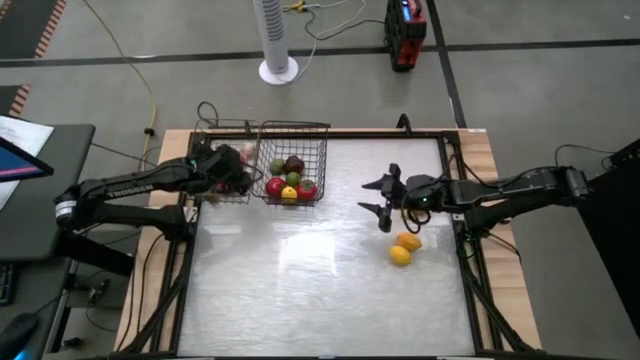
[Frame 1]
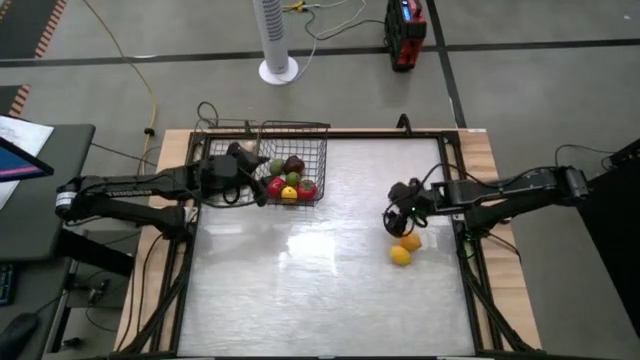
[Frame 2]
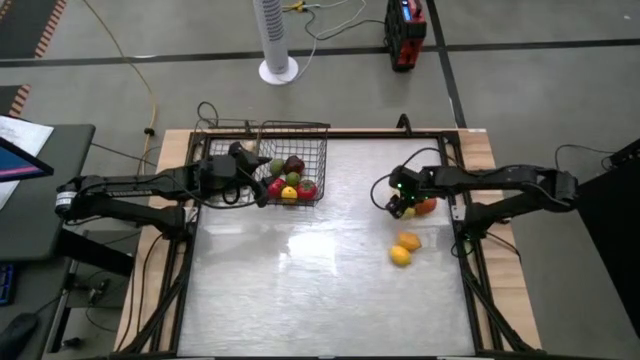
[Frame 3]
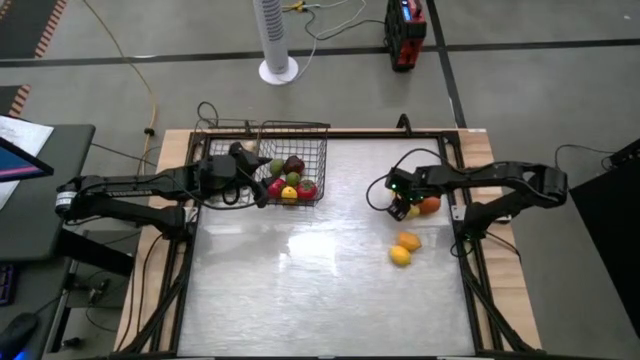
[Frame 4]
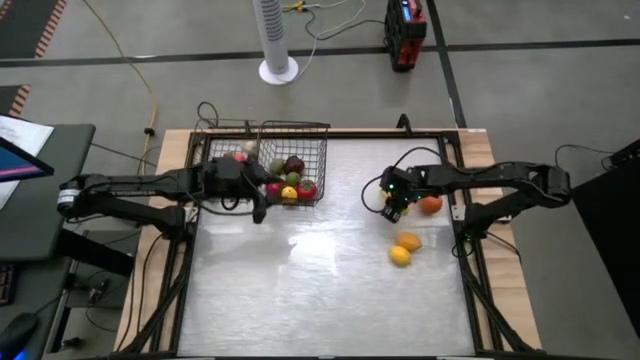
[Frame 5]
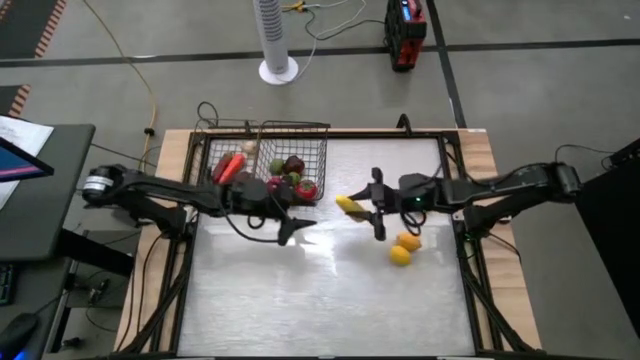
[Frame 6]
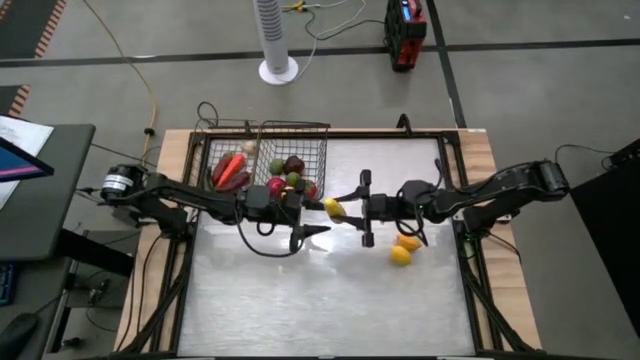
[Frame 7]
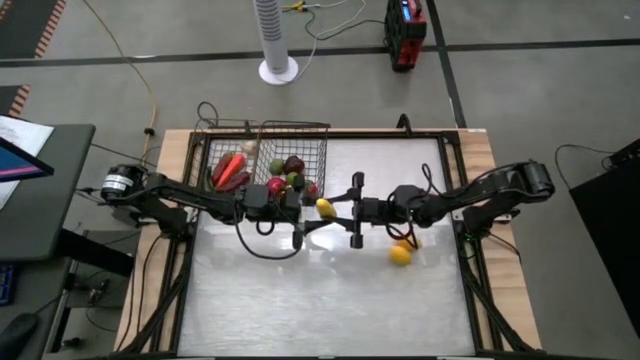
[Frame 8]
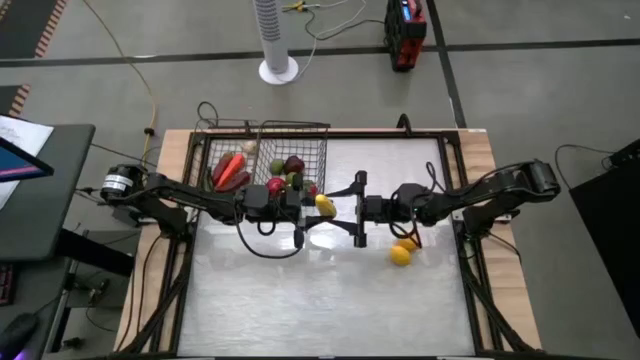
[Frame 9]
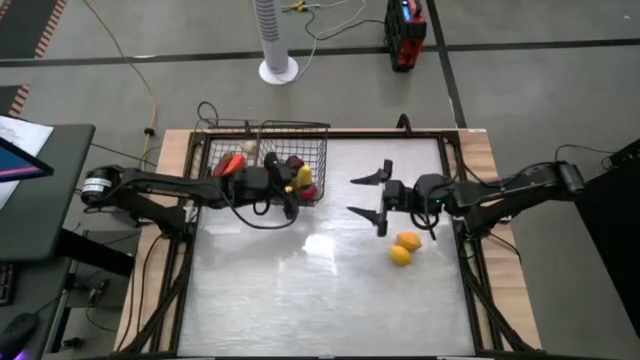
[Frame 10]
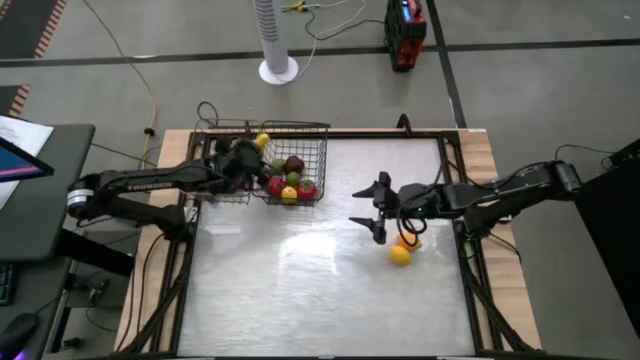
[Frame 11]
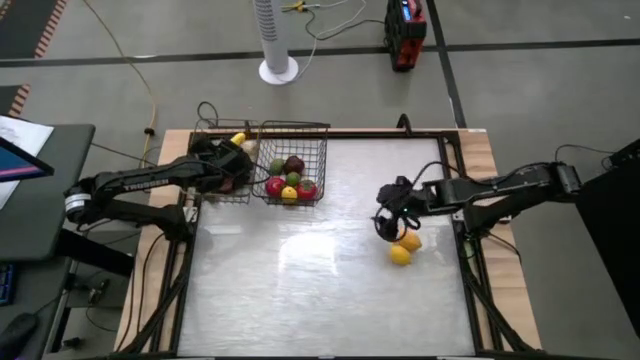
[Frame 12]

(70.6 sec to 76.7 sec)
Task: Sort produce into baskets
Put the yellow corn into the left wire basket

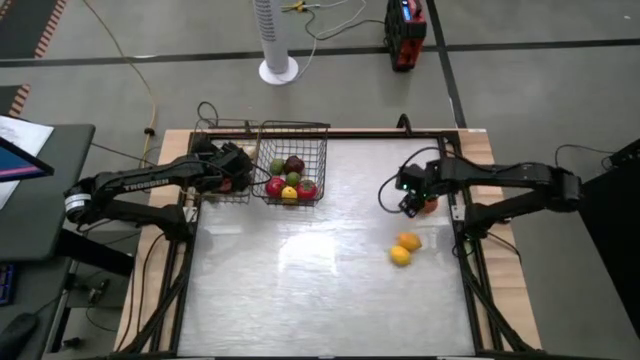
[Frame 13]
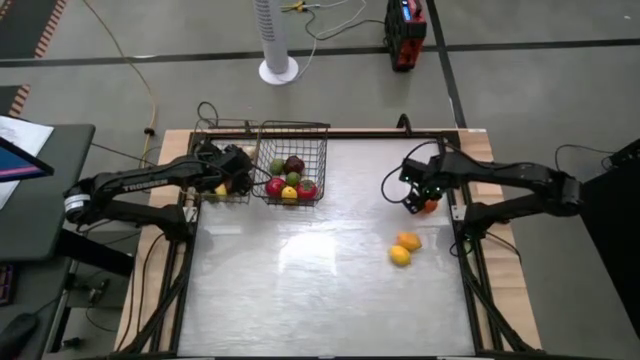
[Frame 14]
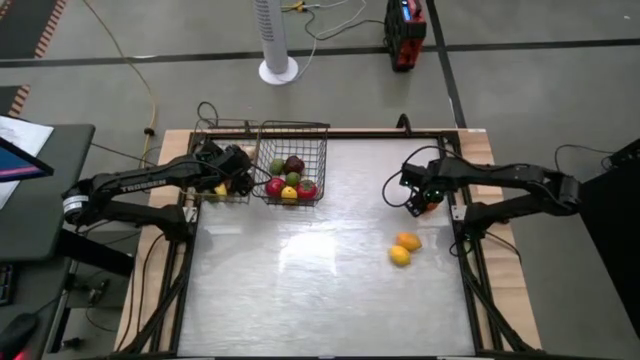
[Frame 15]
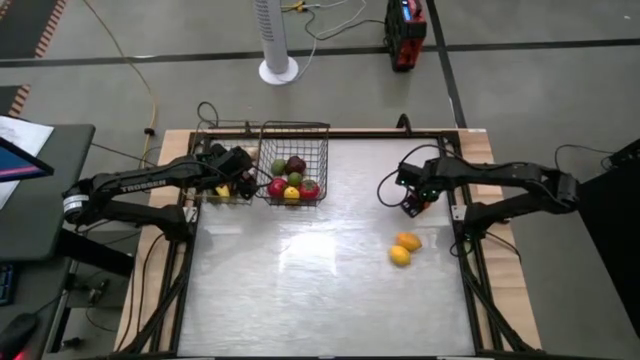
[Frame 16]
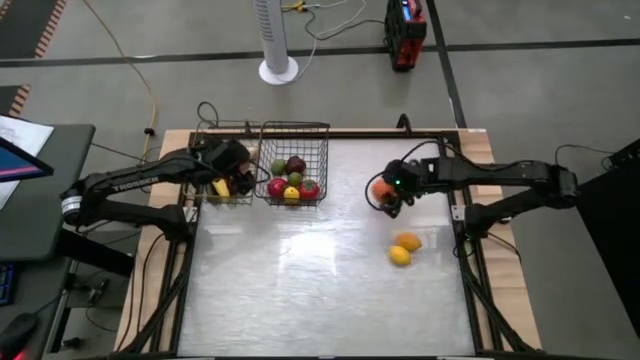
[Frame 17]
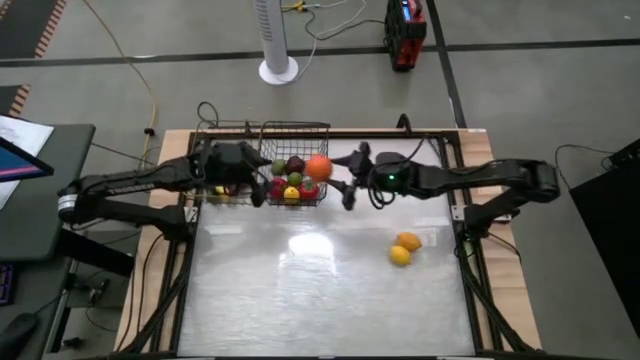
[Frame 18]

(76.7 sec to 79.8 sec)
Put the orange into the right wire basket

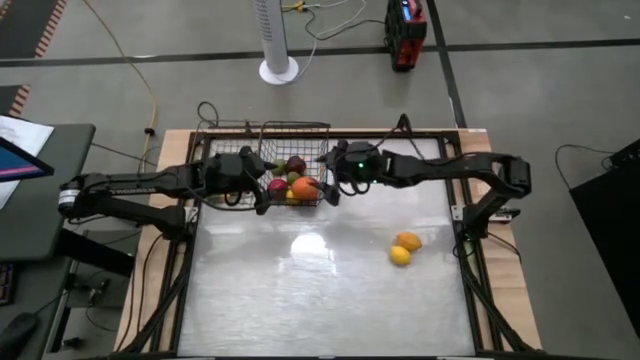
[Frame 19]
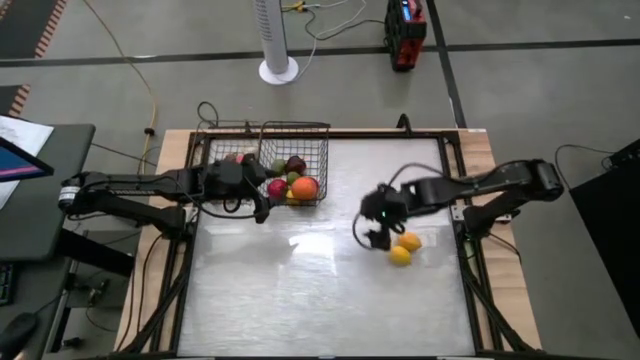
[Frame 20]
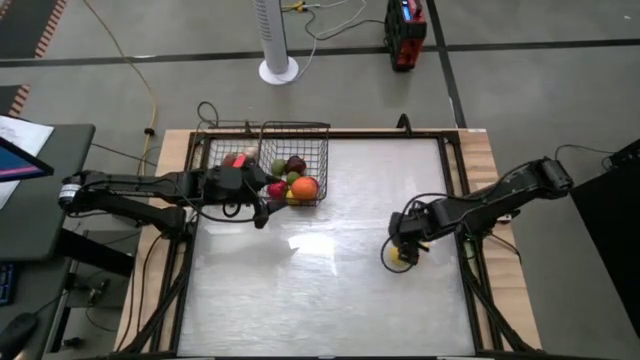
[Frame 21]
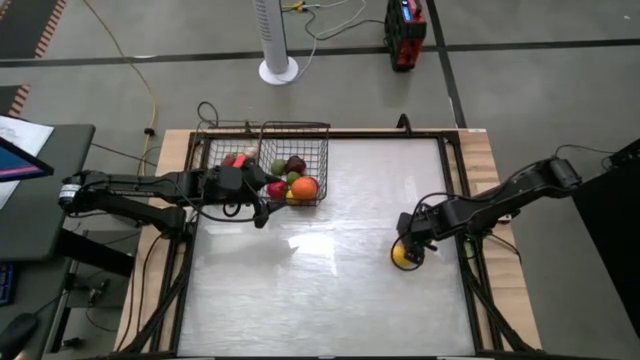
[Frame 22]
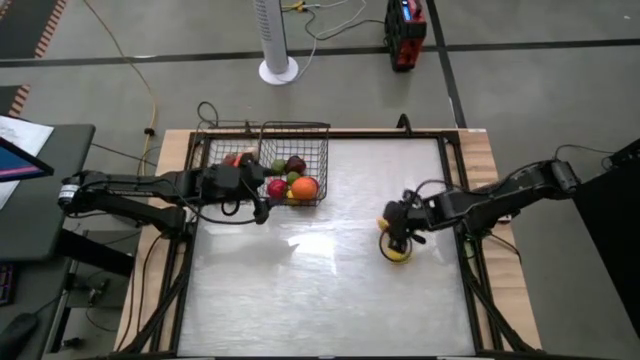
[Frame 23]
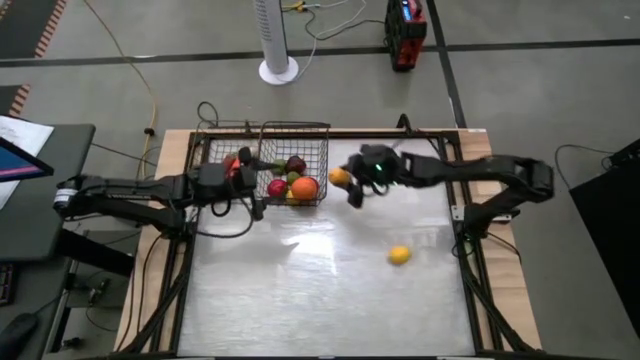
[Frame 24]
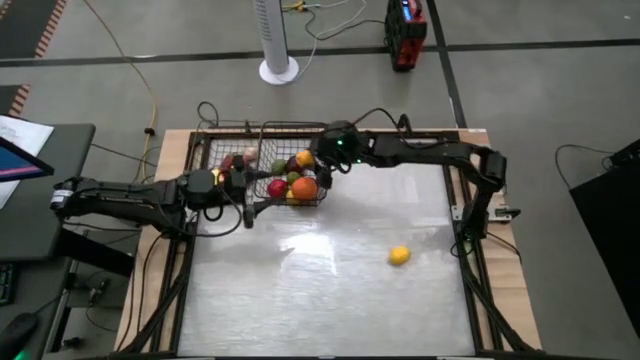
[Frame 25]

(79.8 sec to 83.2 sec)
Put the top orange lemon into the right wire basket

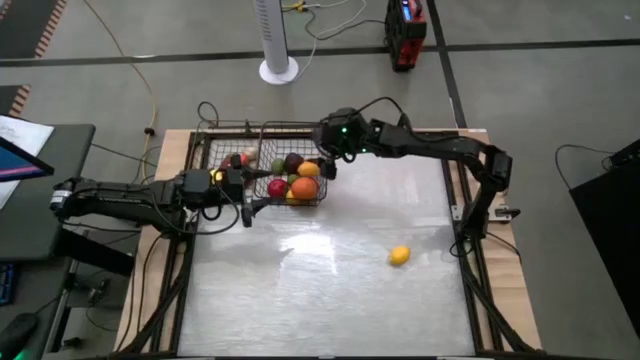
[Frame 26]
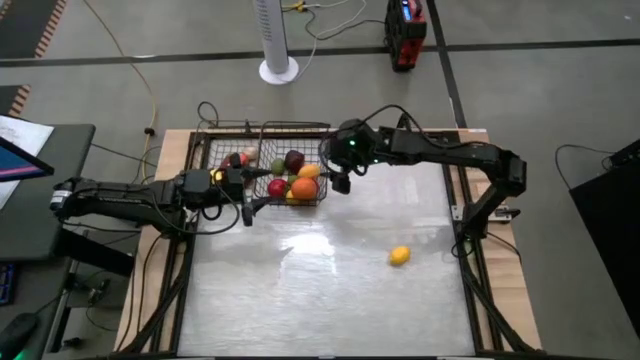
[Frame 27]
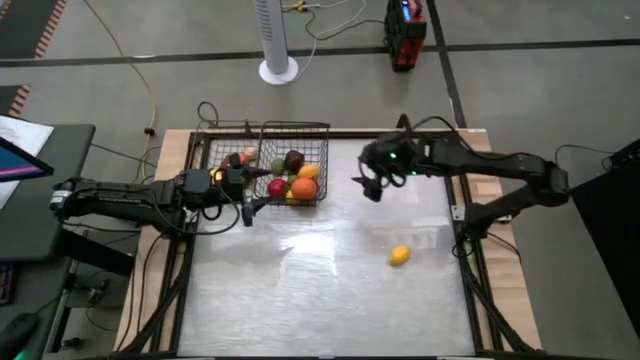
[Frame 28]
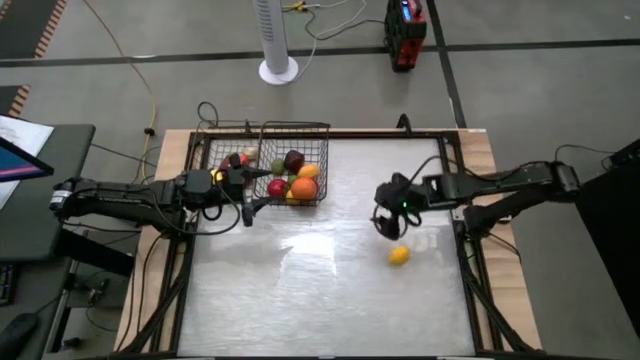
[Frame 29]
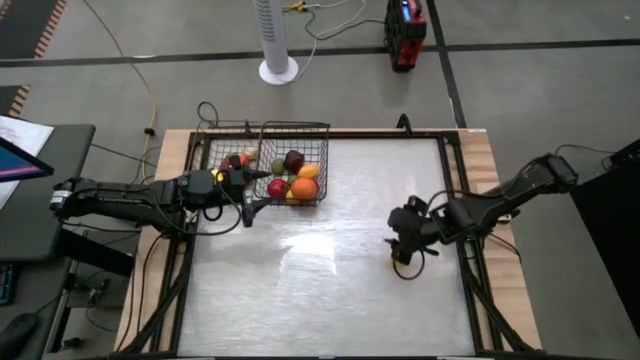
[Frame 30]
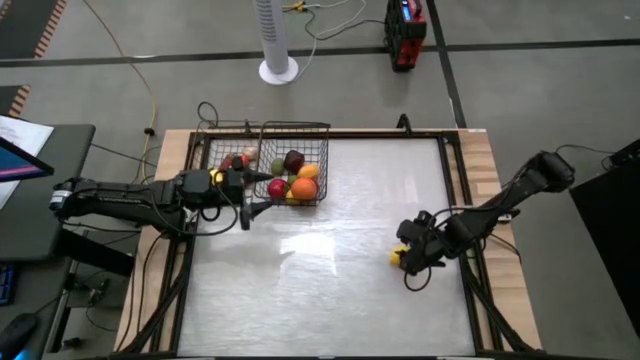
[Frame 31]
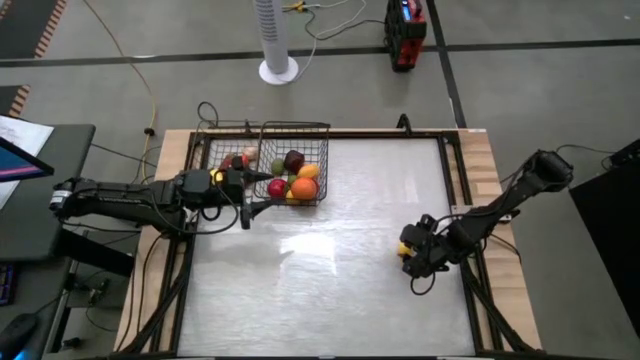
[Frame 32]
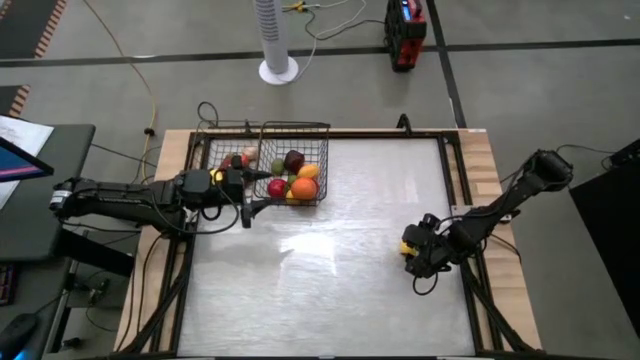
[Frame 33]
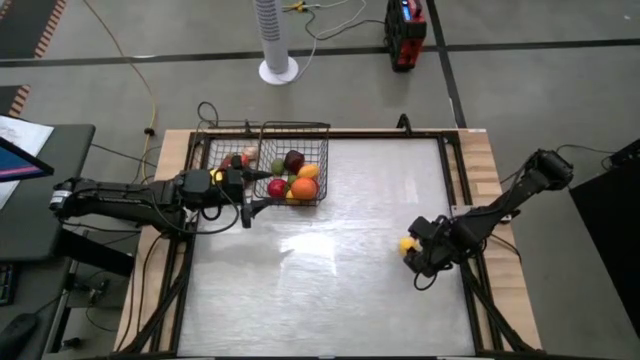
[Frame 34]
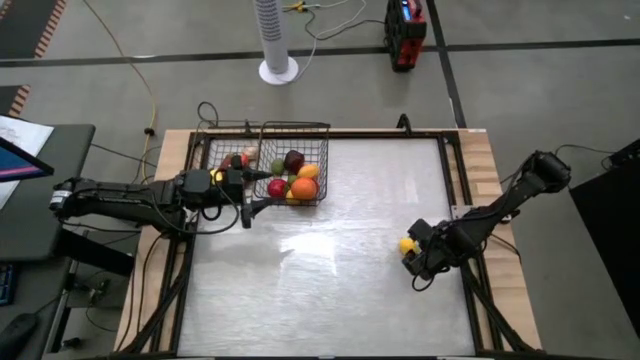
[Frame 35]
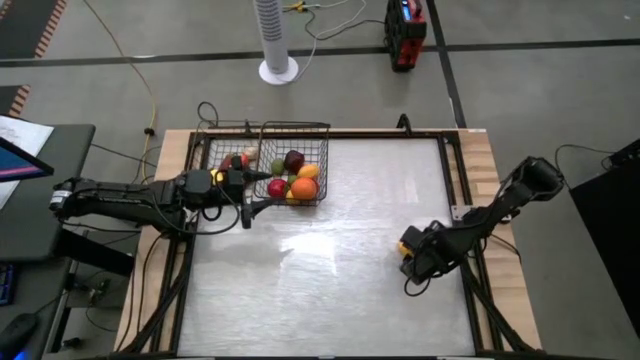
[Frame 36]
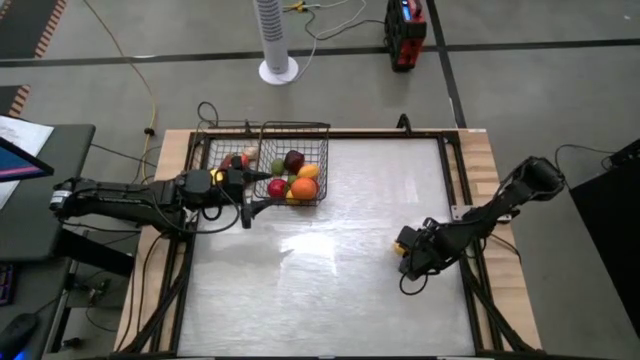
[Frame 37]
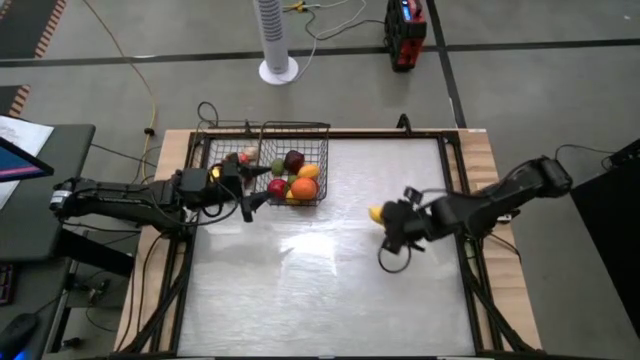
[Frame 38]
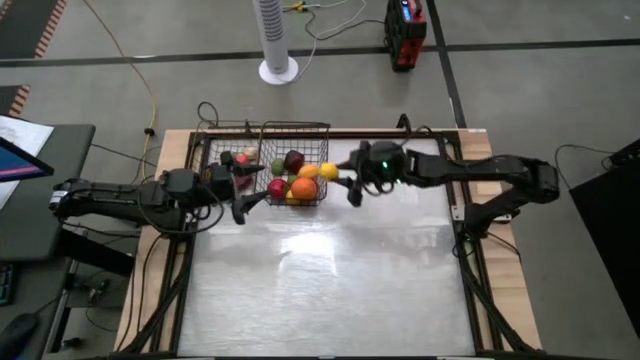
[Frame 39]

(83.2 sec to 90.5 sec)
Put the orange lemon into the right wire basket

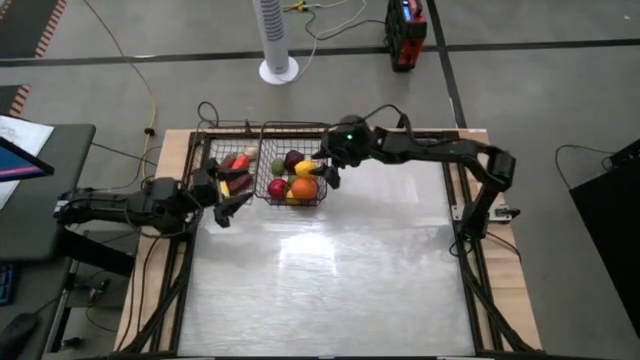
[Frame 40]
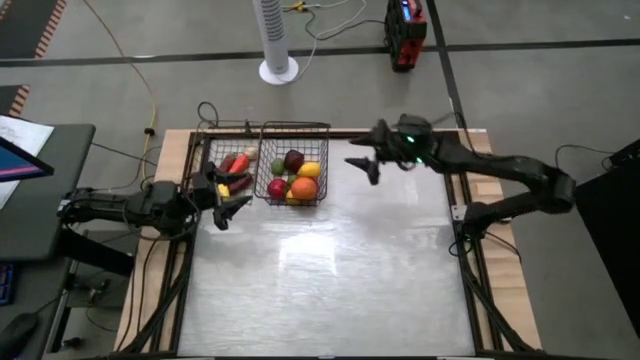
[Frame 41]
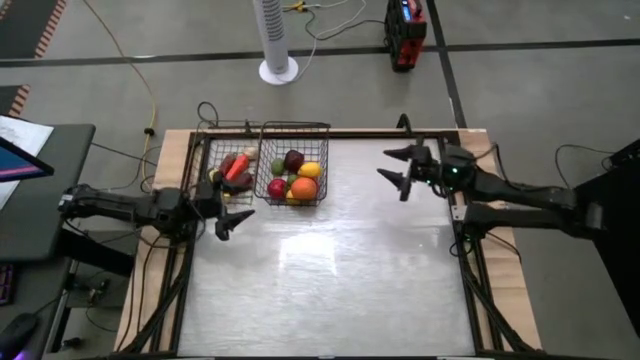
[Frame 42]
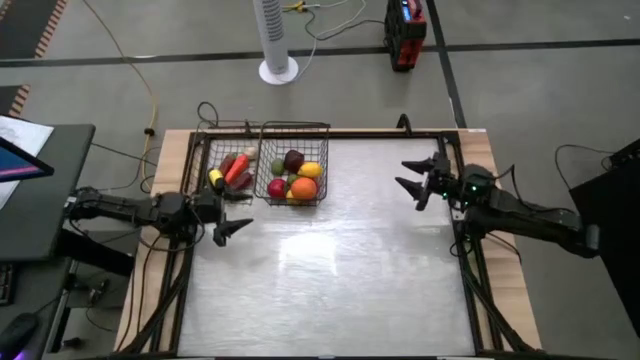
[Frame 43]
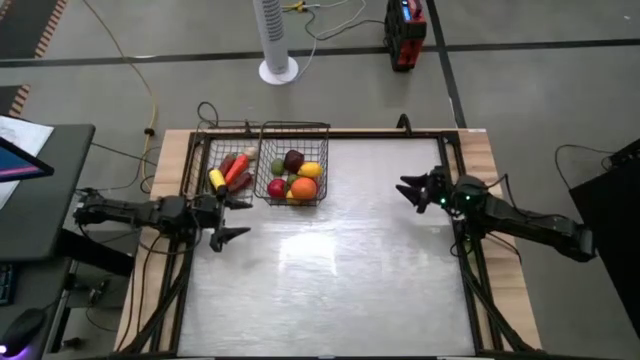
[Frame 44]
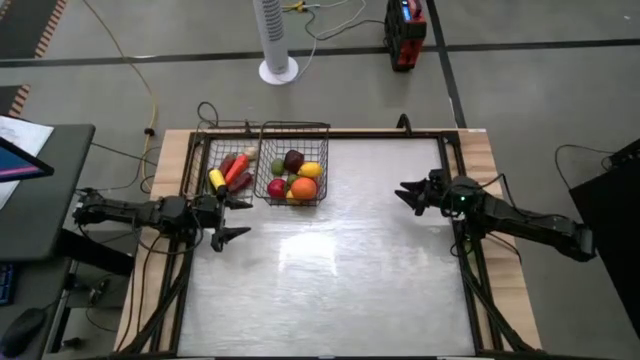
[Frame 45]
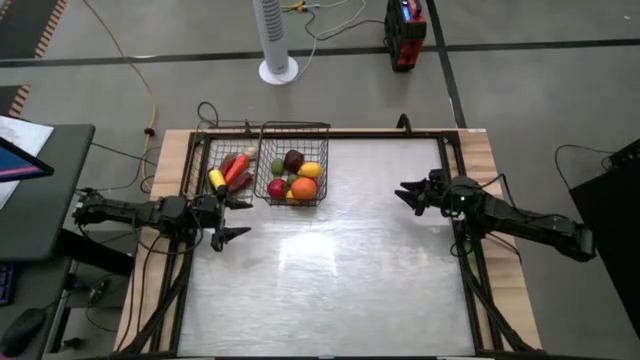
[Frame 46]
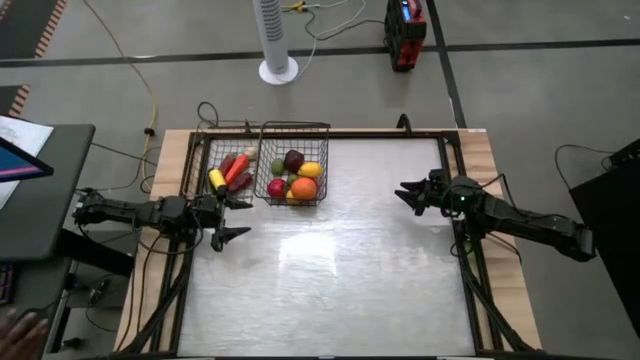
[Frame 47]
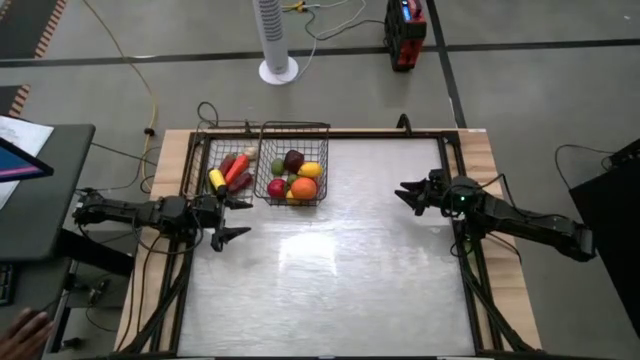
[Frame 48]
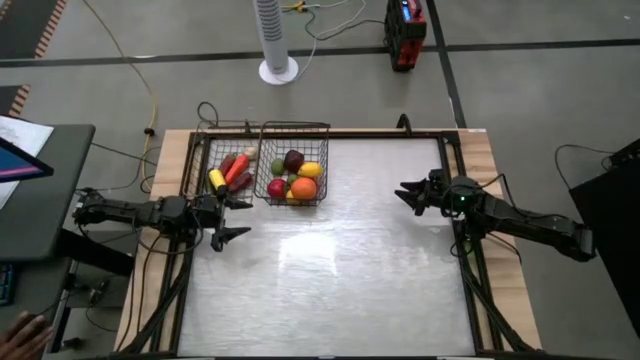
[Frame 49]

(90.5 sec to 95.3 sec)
Return to Home Position
